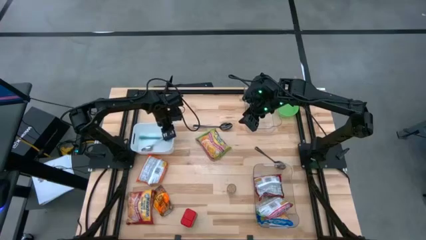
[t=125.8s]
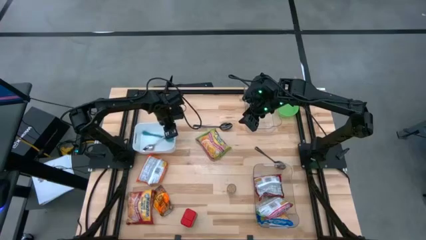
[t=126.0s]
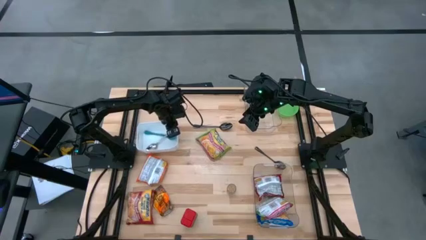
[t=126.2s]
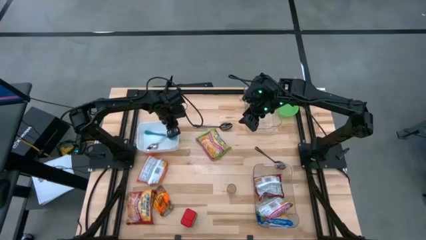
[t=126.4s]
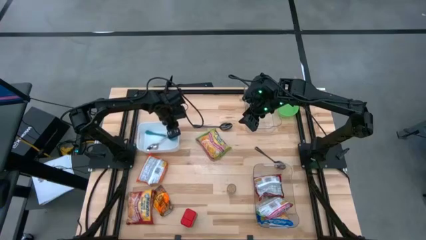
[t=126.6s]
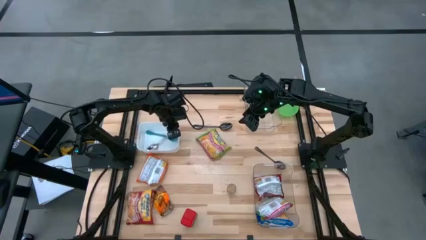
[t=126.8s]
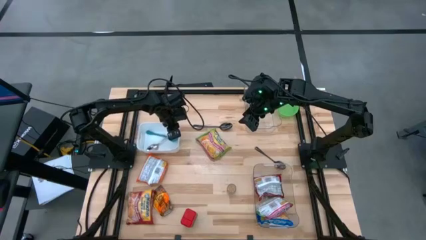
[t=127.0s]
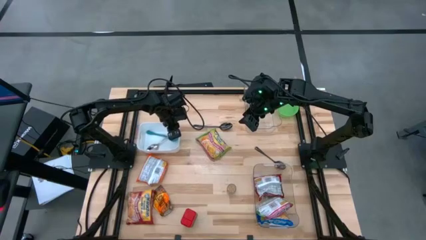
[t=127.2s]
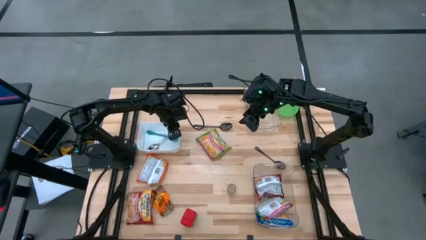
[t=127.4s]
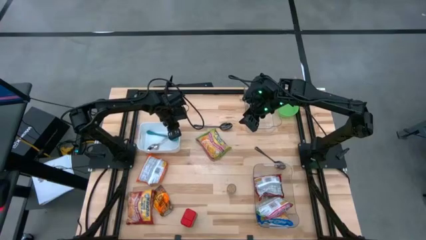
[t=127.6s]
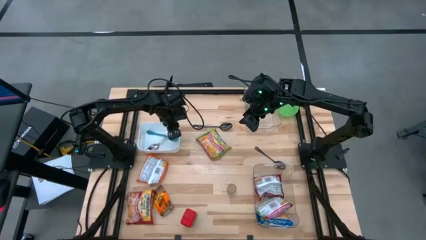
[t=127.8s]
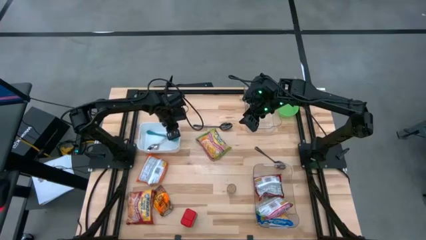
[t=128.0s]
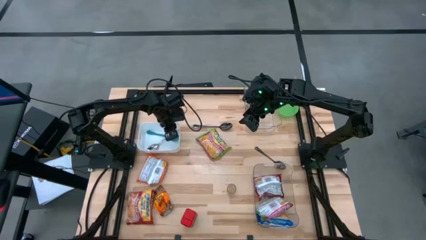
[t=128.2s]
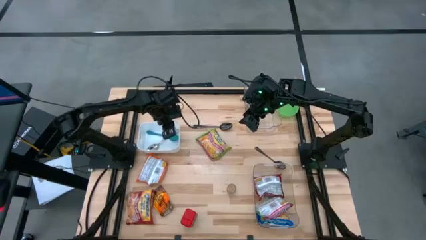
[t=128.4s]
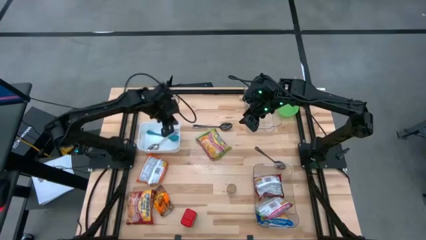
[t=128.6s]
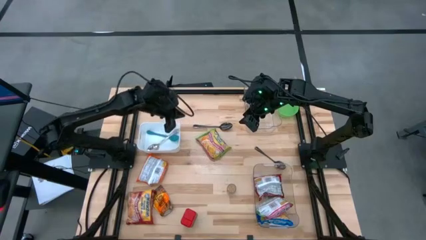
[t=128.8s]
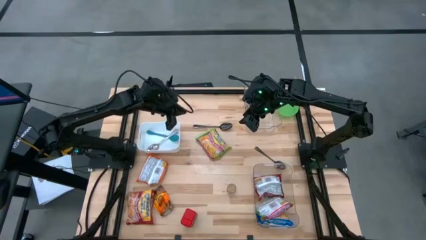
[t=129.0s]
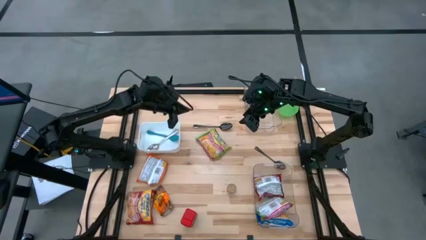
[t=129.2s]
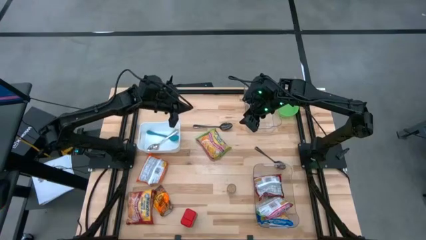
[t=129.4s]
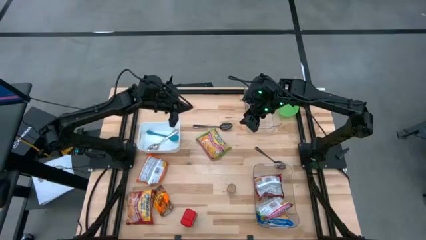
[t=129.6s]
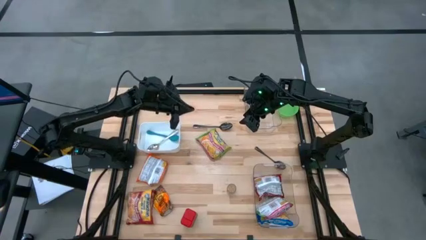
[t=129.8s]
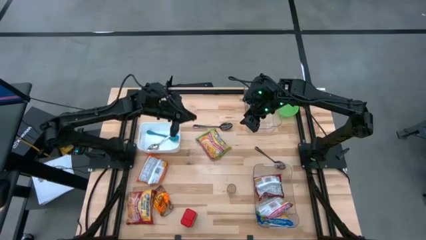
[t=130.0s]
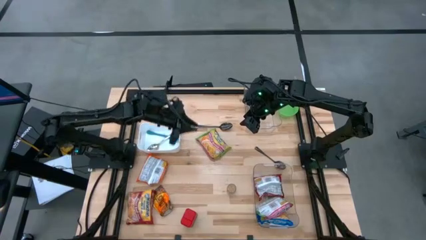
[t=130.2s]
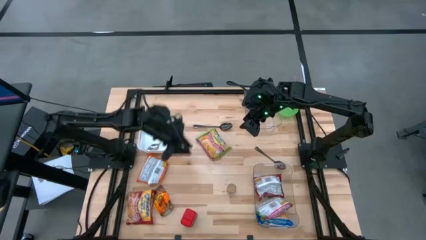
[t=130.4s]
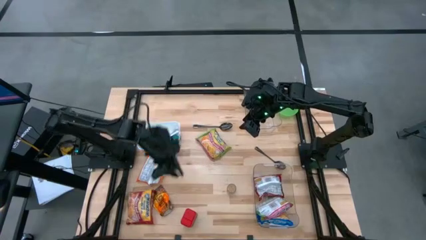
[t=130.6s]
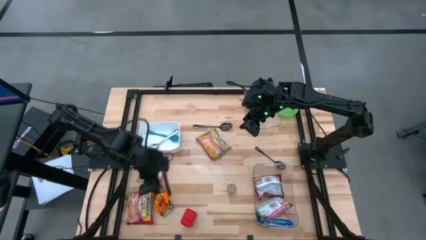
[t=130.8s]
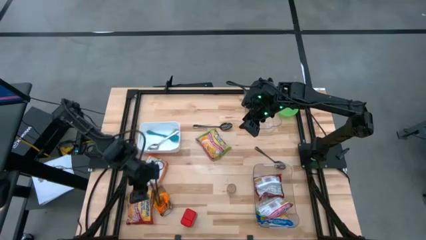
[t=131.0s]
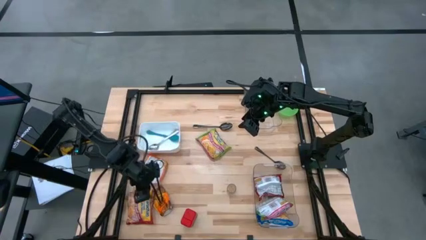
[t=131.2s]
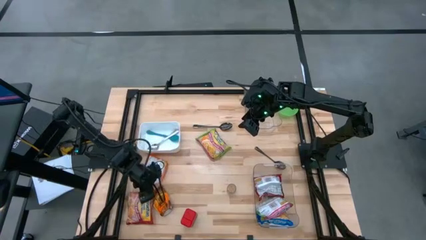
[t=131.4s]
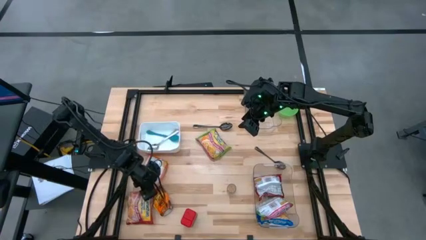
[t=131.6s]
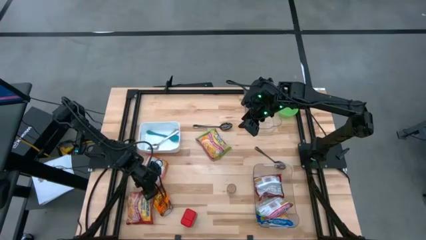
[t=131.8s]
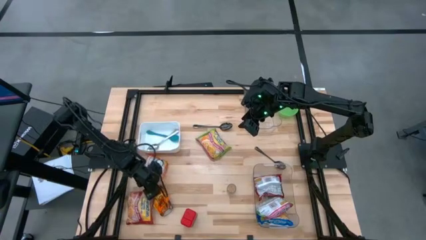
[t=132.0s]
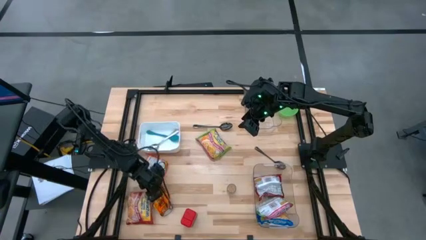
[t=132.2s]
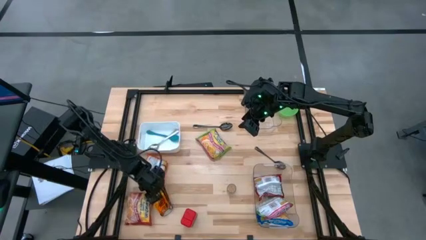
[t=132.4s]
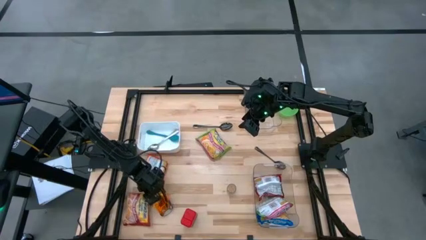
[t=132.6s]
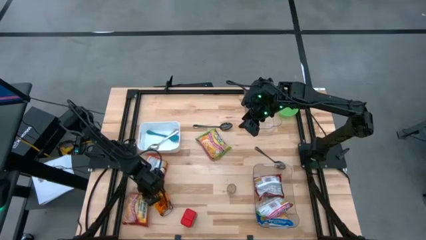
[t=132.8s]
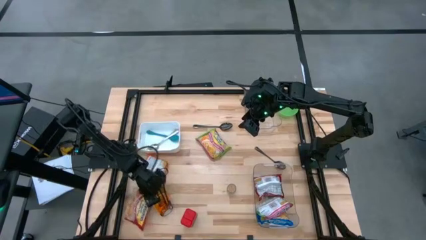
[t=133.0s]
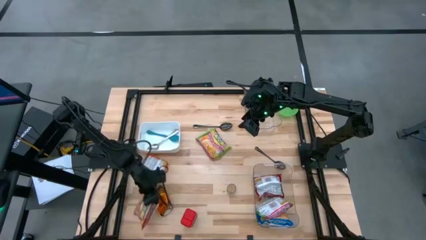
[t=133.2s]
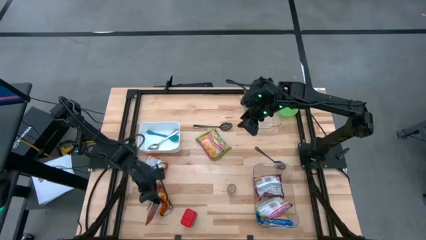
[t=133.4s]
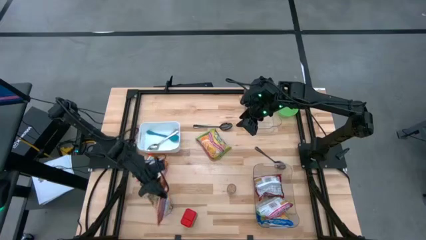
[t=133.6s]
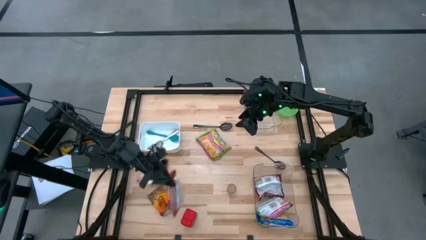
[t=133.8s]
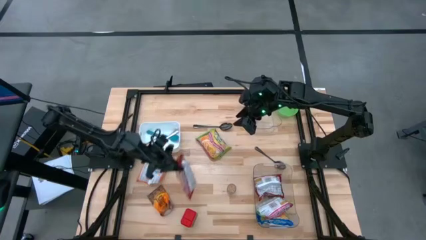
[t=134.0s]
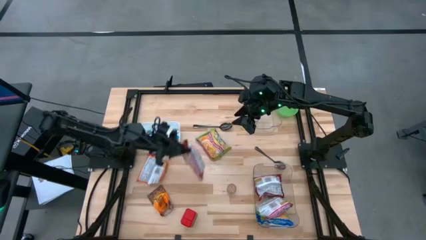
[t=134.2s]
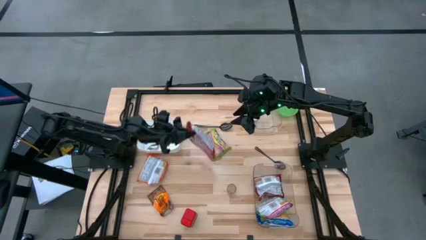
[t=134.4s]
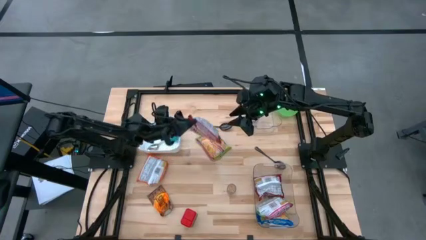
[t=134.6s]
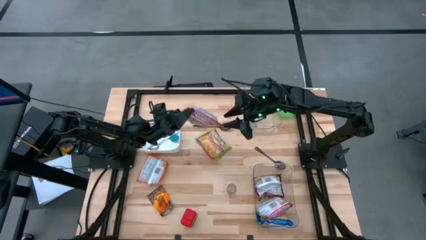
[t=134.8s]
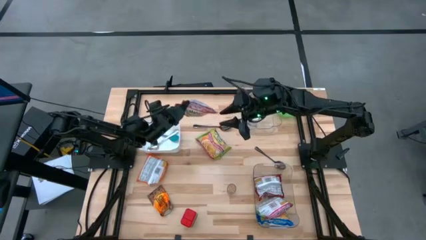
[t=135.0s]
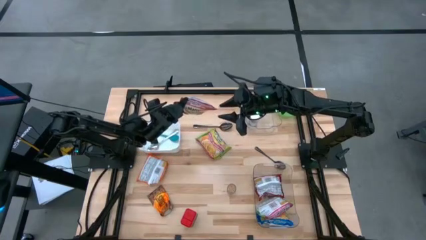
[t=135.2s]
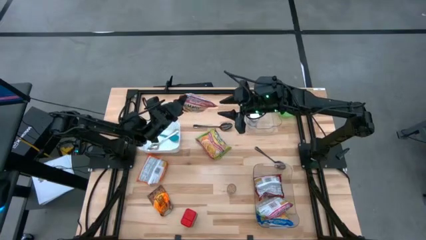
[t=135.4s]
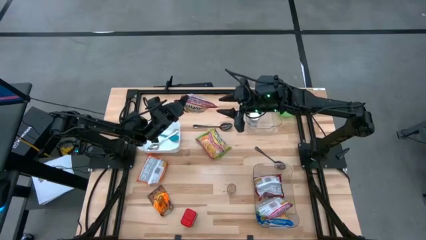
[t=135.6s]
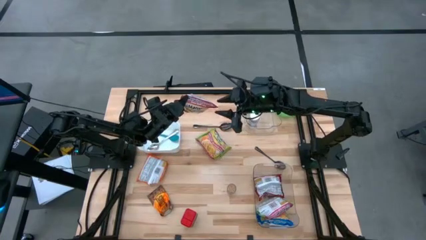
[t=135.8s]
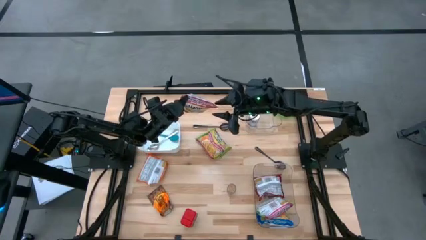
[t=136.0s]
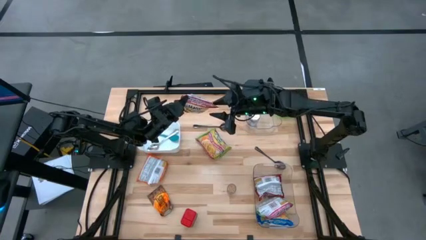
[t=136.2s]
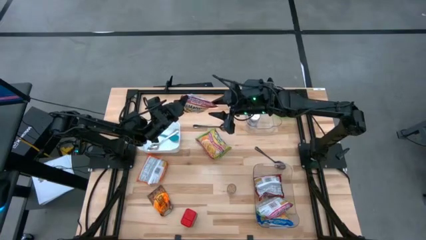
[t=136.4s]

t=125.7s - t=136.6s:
Task: Pick & Place Food Item
Put the red noodle pack into the bottom transparent bin

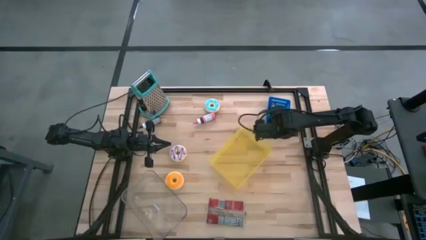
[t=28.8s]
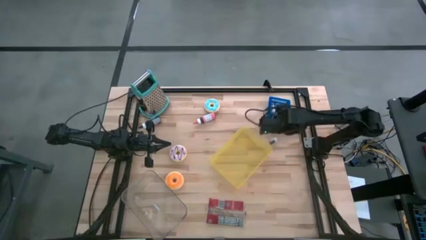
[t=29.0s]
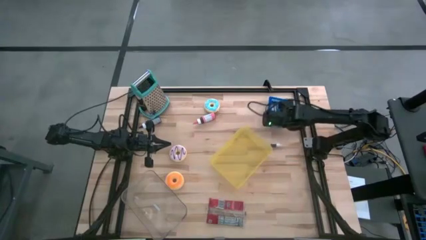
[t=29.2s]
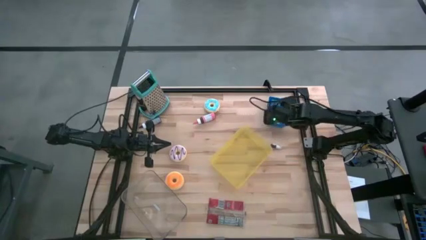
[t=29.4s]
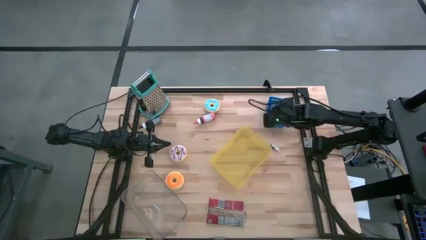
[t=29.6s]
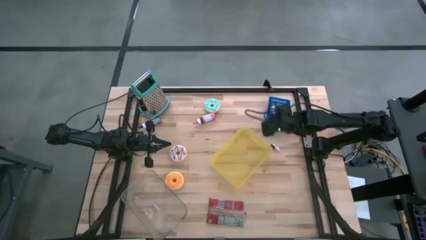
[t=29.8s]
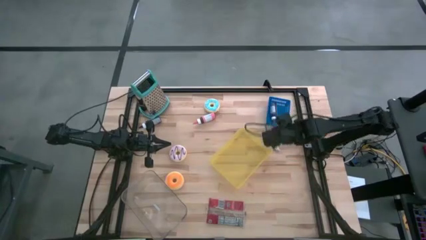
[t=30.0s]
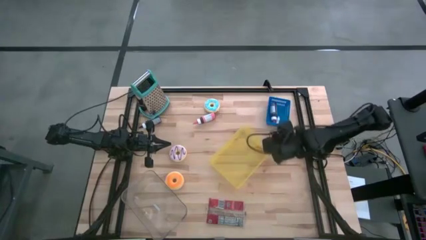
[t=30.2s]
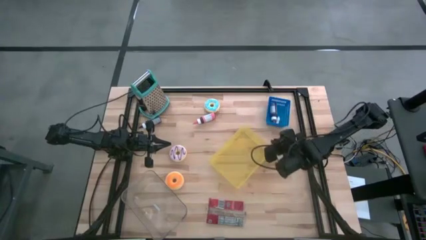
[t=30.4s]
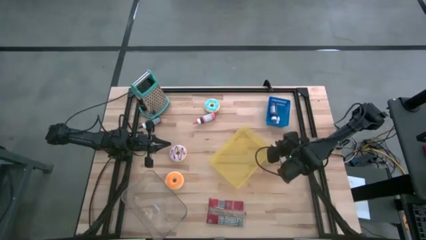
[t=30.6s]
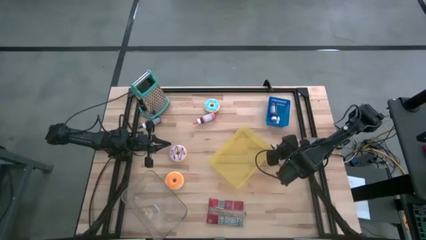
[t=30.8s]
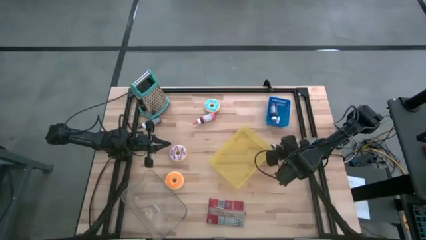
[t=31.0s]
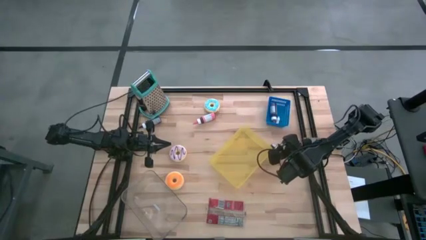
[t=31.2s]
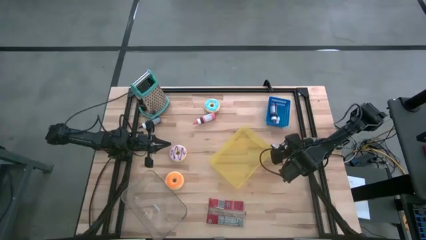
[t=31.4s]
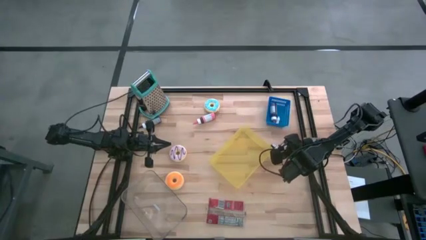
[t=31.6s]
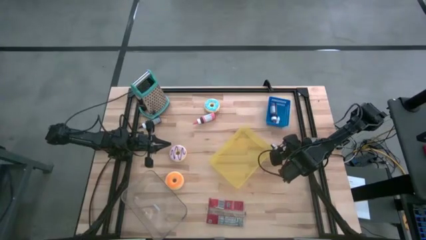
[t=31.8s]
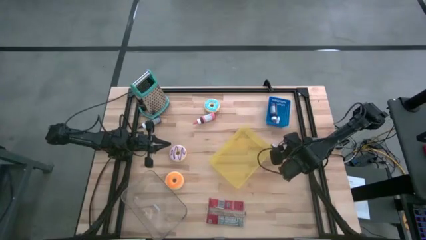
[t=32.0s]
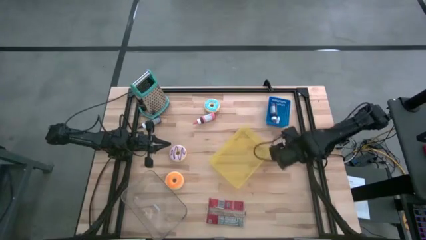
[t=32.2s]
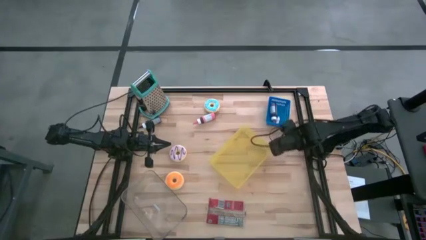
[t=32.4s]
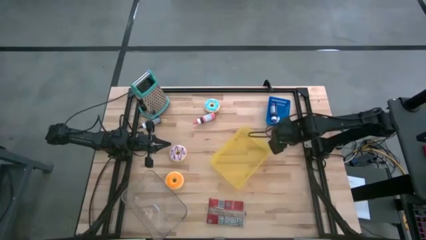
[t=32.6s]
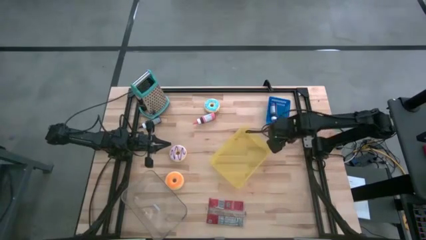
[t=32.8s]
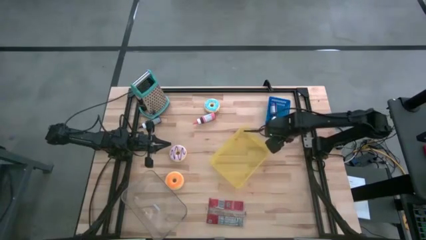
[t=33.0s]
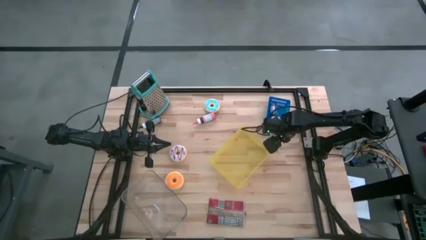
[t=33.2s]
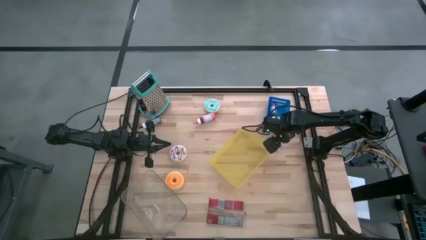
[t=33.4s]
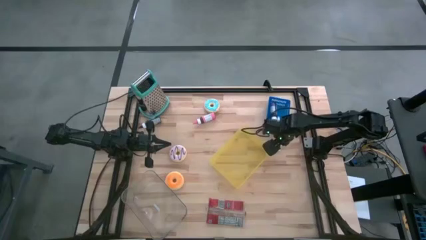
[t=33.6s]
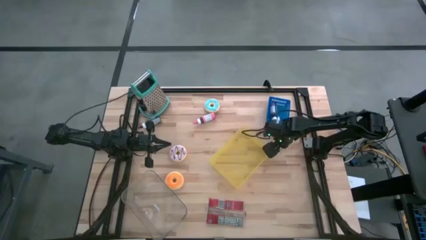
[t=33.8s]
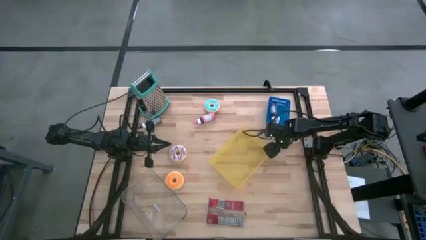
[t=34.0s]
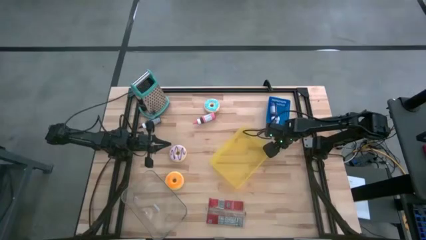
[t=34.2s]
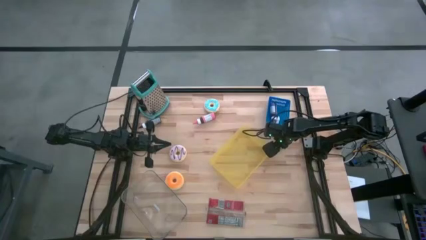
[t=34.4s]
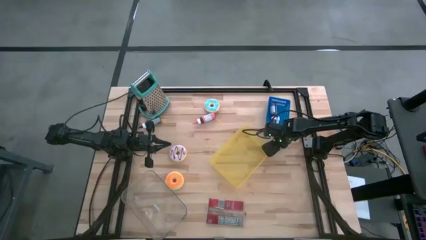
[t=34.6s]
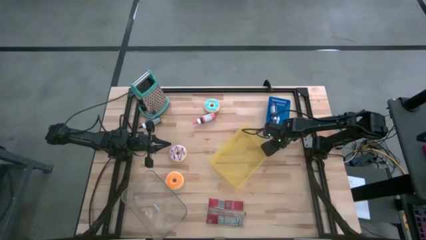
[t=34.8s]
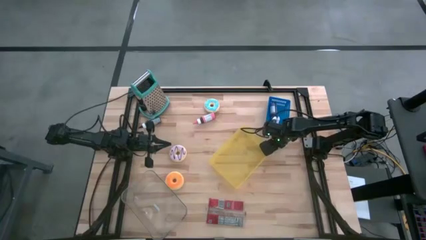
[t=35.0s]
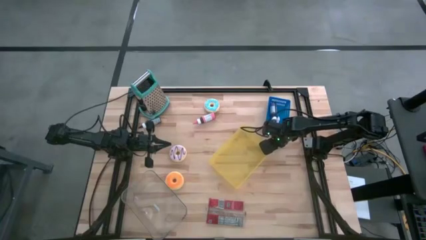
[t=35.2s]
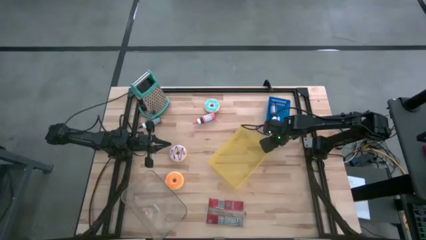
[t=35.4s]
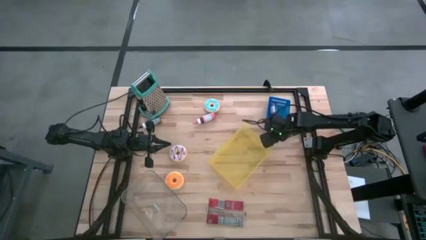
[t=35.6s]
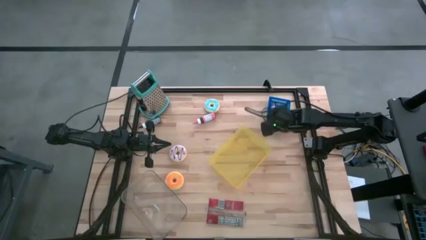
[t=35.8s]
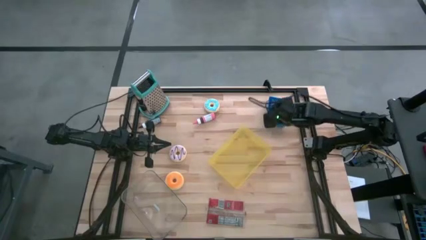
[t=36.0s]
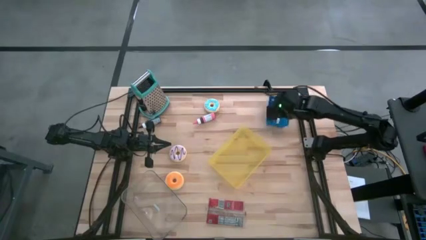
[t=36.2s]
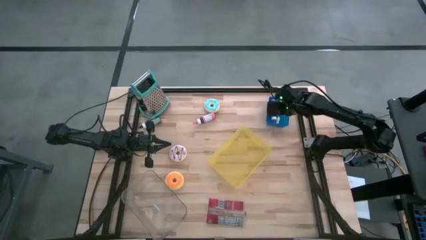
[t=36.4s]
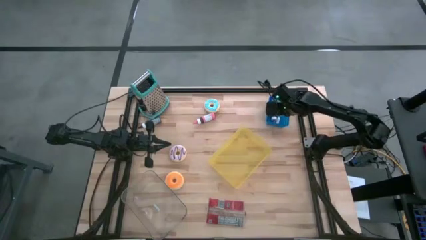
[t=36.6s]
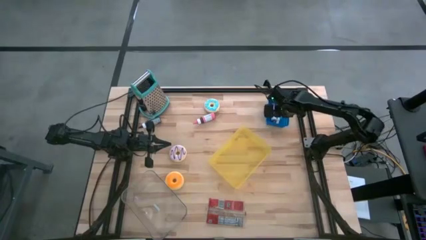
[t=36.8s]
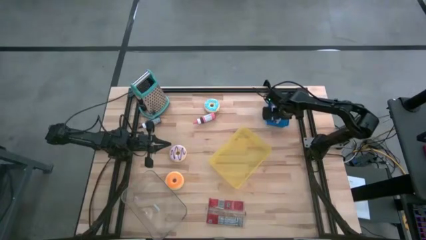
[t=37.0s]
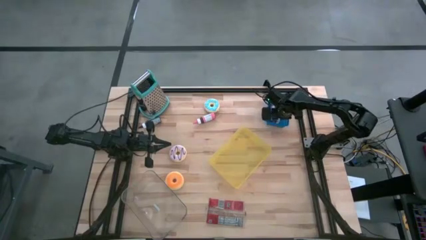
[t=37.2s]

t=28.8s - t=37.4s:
Task: Pick & Place Food Item
Put the small black food coloring bottle into the blue bin
